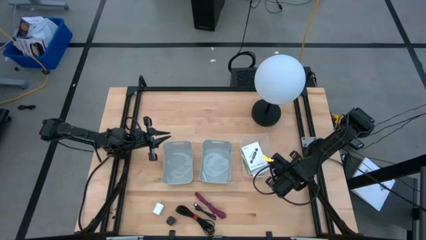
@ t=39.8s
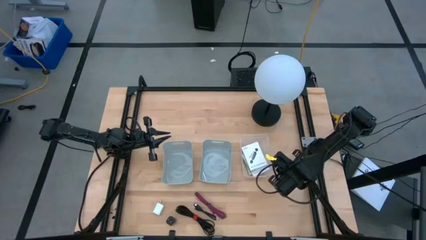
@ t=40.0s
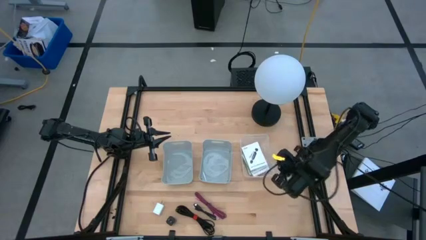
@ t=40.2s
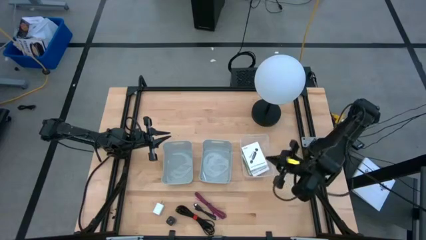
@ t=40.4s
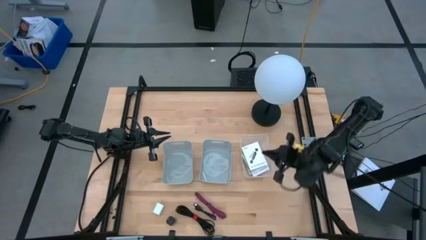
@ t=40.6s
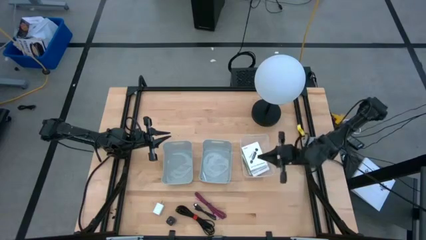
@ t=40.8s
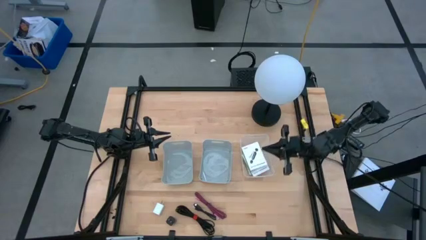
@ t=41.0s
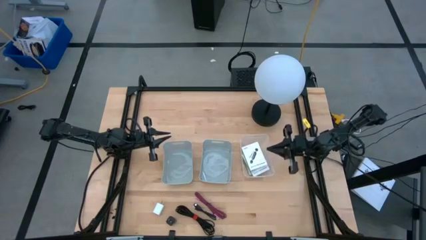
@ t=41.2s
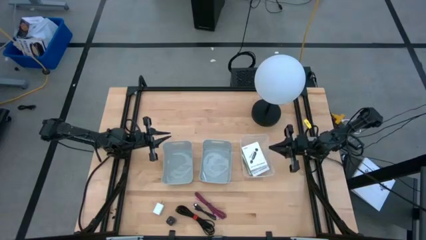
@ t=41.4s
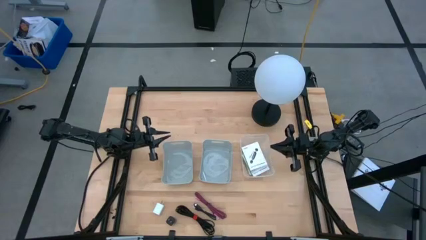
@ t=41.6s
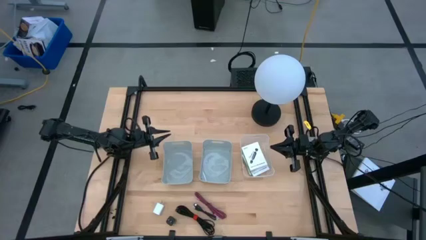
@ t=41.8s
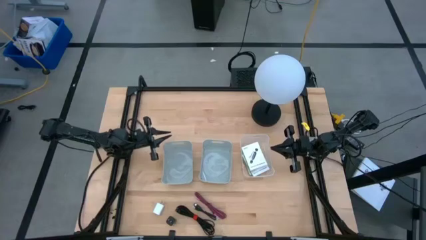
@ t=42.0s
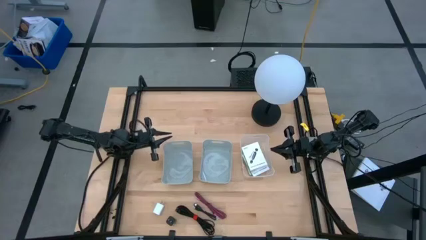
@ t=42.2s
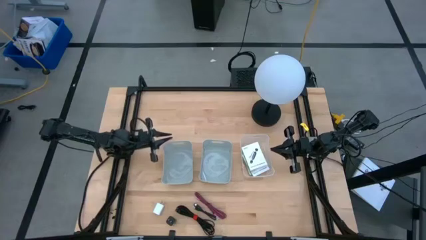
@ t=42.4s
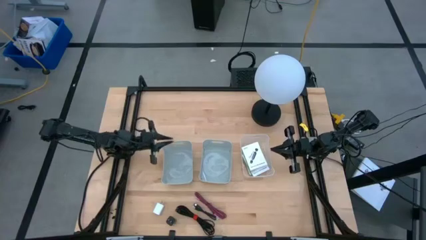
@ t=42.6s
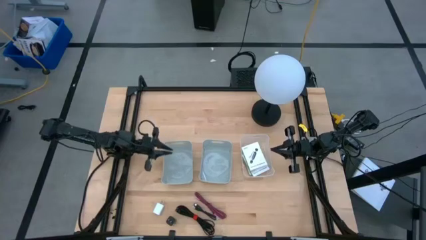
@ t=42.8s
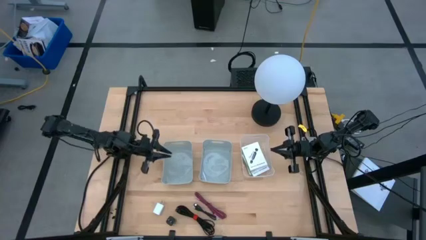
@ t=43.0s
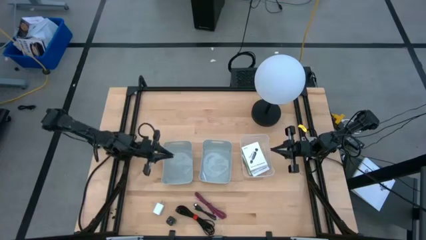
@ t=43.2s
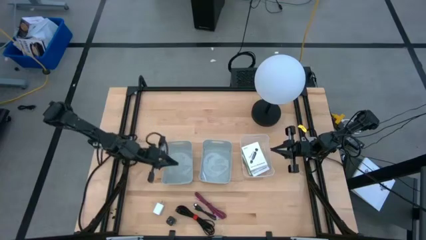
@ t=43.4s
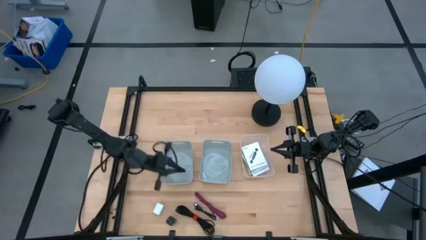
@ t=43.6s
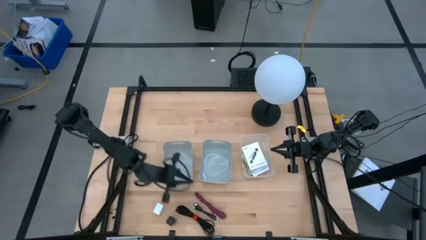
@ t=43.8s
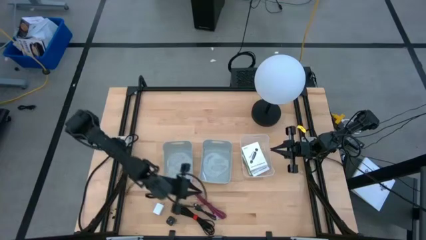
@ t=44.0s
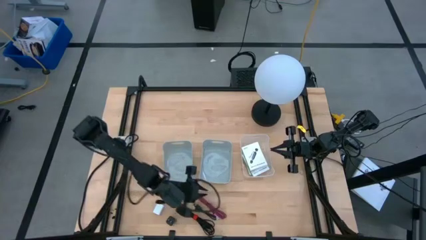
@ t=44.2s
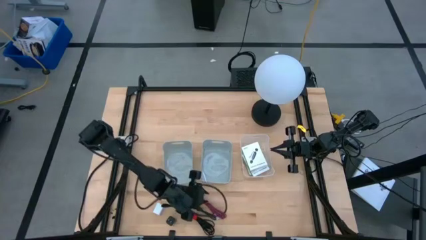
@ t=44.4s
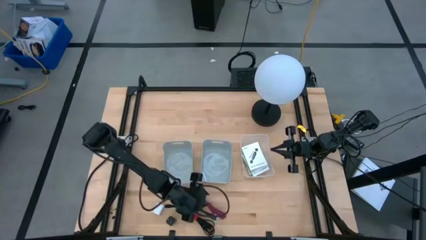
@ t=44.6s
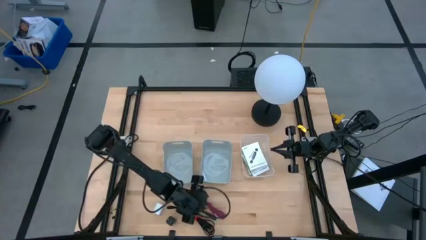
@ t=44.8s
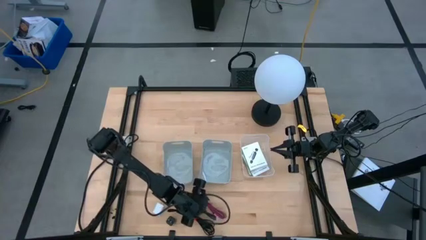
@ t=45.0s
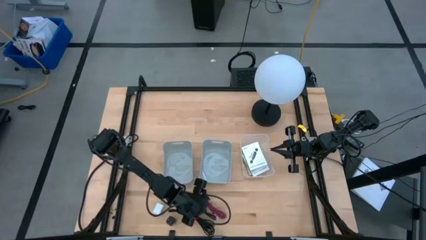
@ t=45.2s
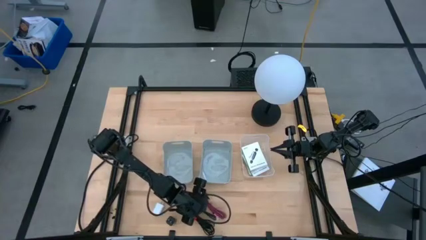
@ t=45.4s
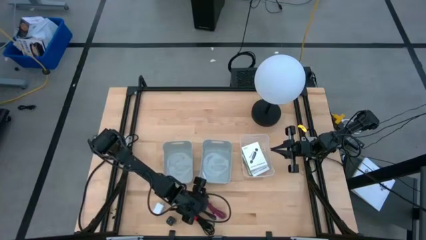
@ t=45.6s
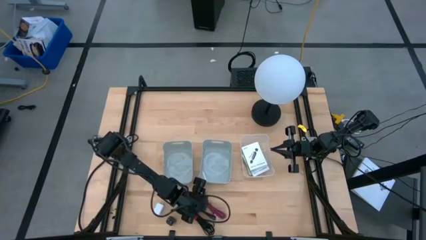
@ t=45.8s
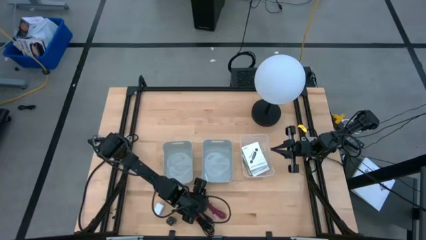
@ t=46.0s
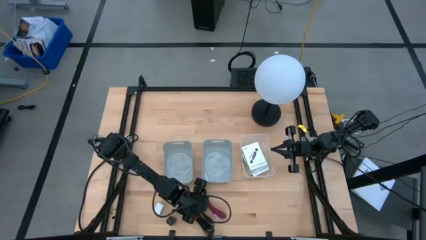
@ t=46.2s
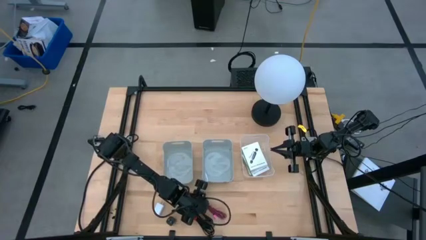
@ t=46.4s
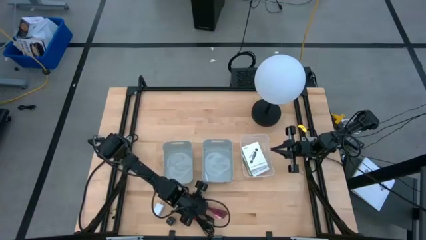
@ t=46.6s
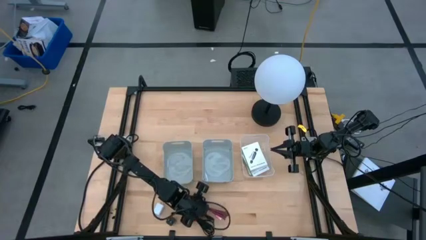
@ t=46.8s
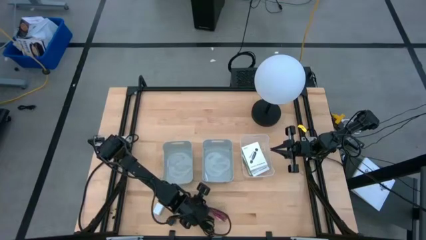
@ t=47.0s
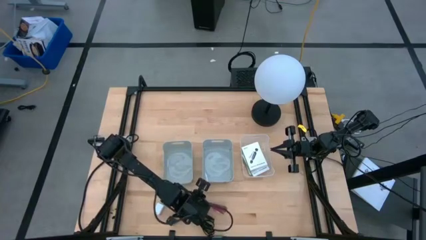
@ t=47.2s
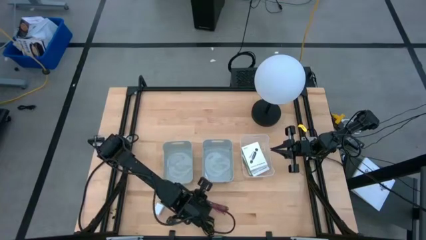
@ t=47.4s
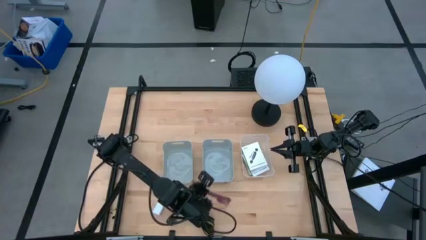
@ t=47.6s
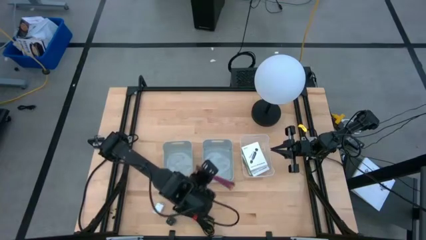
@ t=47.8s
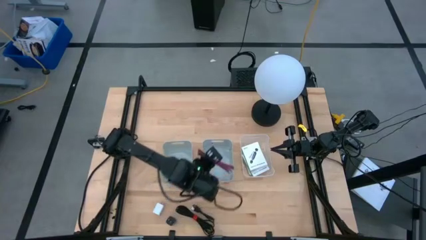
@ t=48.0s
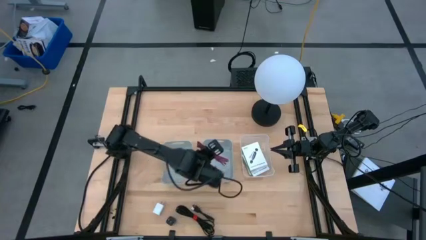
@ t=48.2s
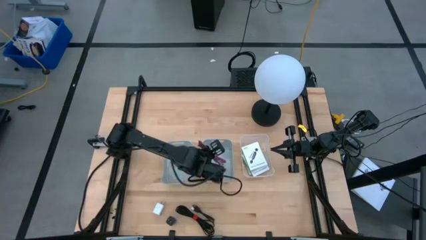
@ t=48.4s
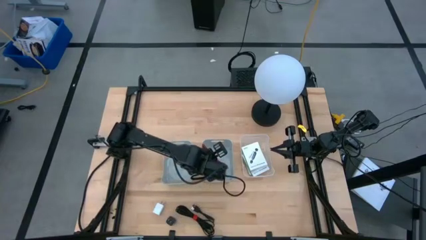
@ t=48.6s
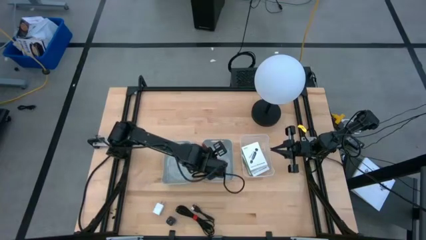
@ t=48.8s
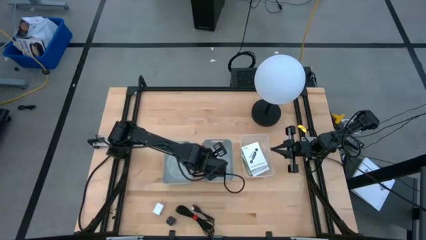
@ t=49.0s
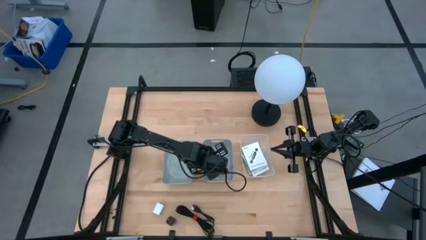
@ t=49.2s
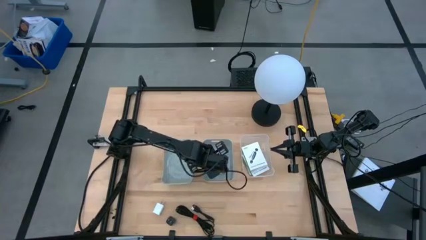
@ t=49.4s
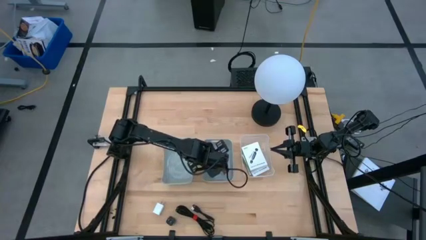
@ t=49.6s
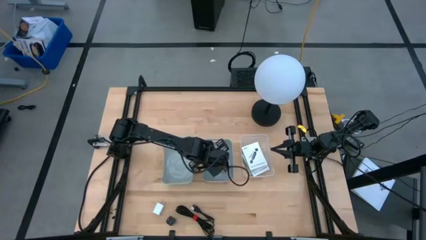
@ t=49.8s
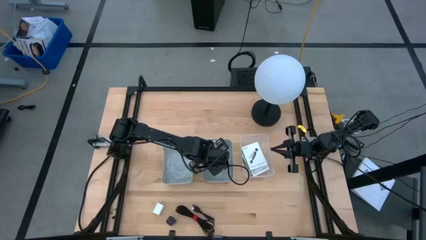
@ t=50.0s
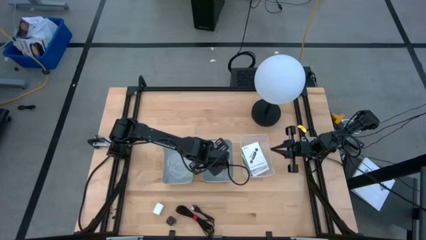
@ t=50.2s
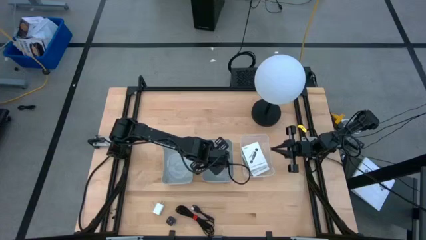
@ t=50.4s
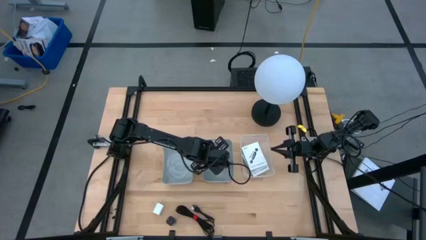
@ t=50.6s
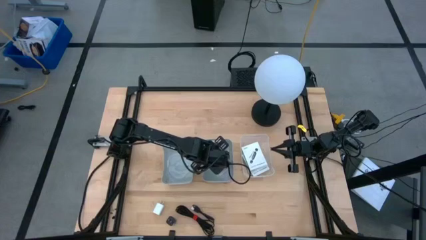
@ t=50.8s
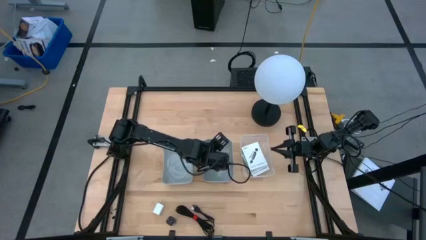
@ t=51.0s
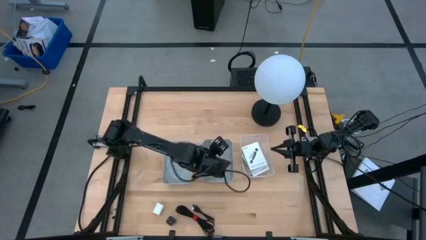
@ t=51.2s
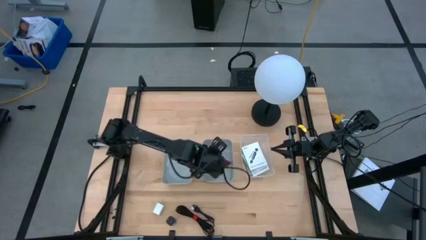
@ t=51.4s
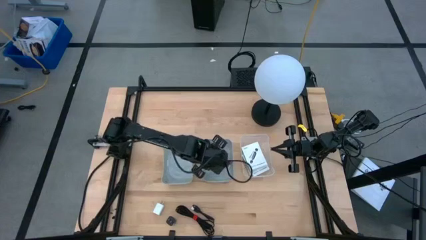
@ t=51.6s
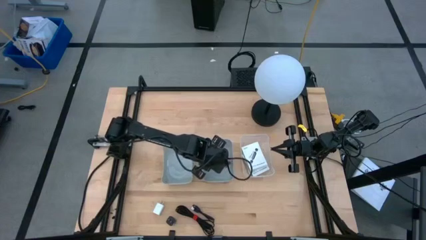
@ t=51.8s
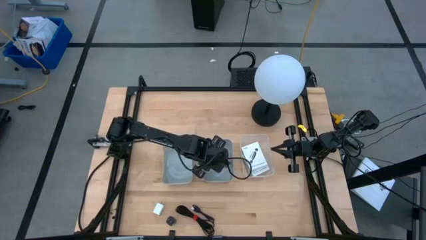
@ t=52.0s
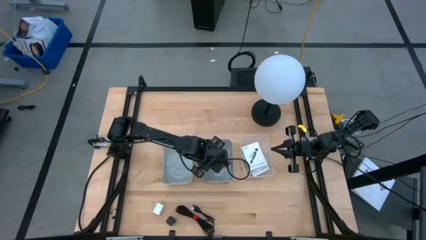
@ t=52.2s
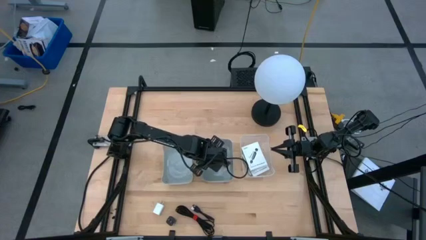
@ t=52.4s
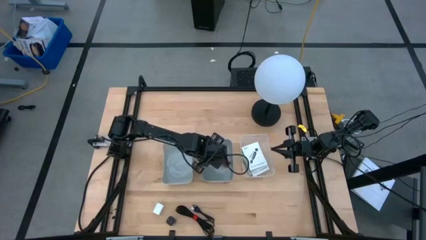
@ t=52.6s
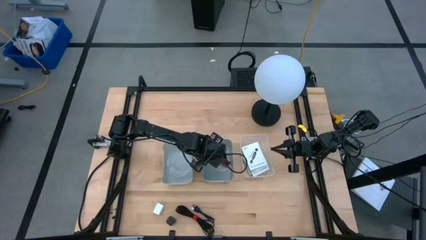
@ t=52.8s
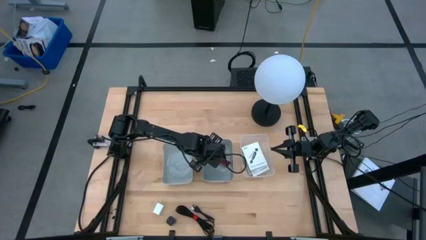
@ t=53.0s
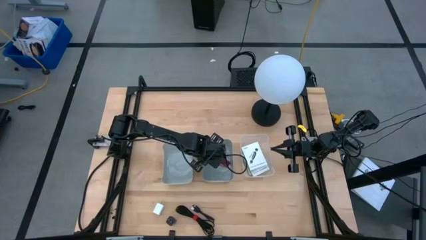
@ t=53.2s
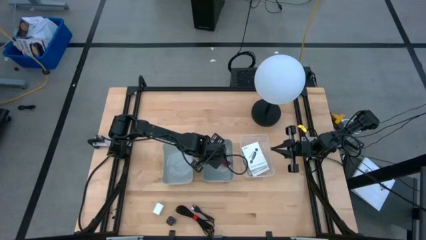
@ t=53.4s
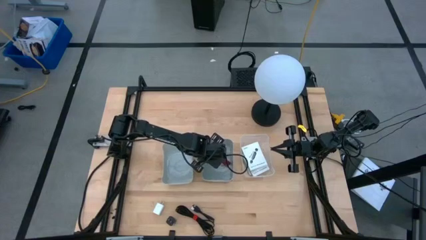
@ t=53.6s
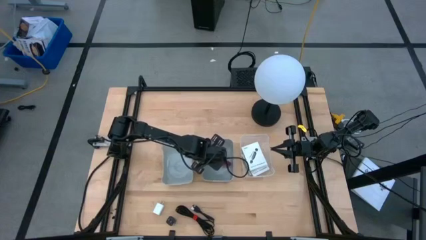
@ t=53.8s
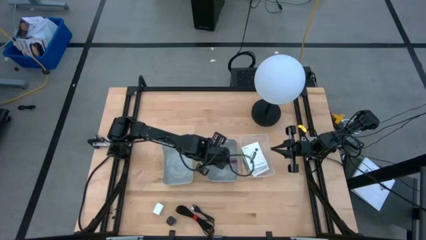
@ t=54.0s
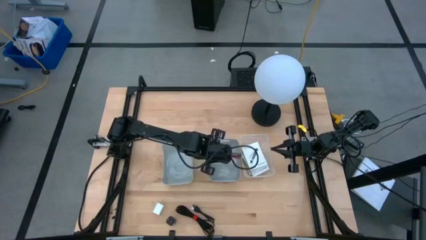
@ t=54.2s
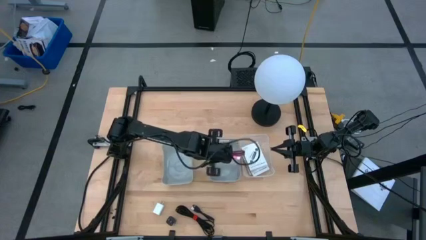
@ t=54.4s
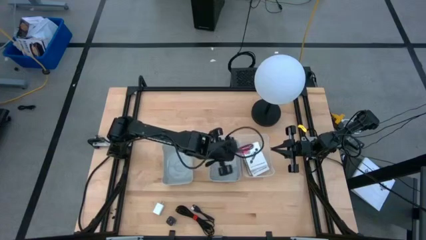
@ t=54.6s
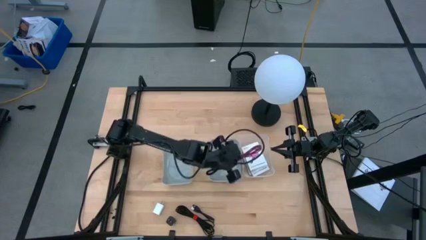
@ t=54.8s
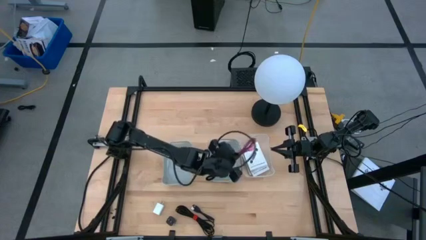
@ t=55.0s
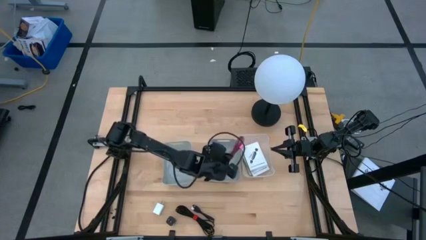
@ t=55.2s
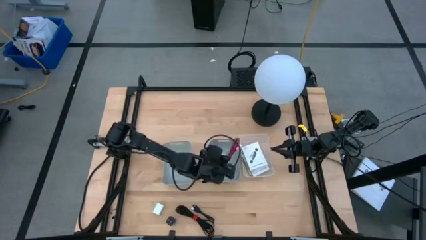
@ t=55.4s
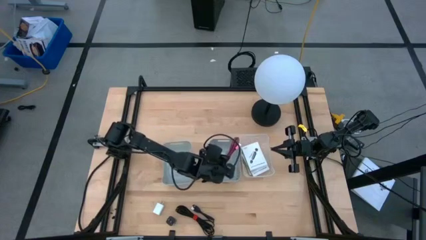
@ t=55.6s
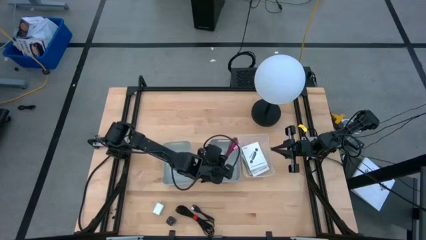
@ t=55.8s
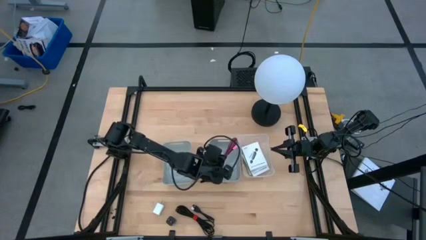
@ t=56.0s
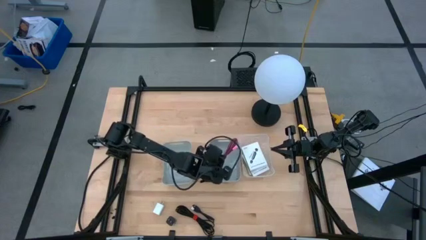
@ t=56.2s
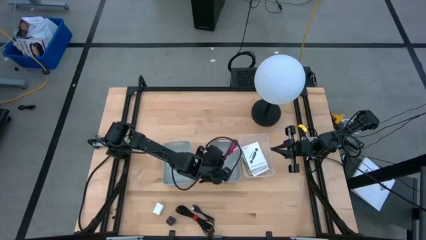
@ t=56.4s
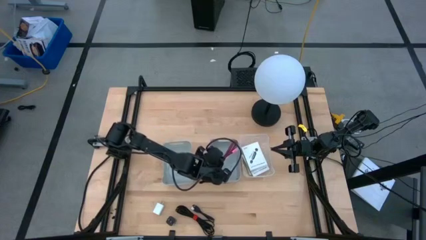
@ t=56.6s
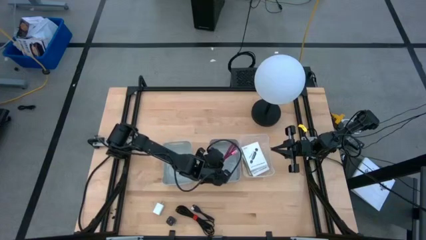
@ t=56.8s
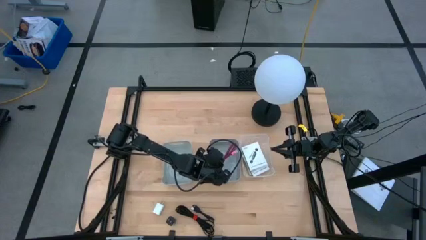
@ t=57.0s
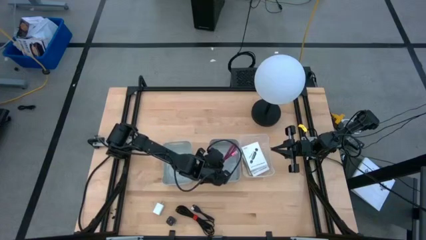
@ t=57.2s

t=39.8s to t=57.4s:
Task: Pick and place items into bin
Put the pink USB cable into the right gray bin
